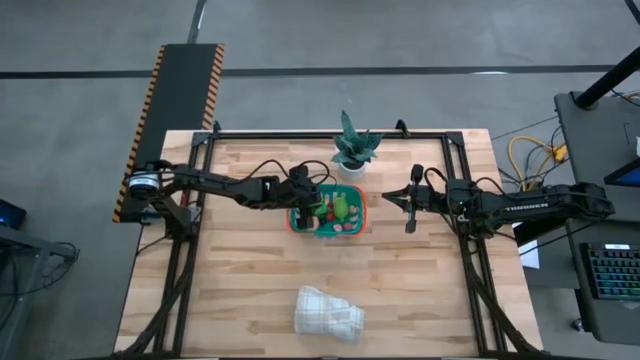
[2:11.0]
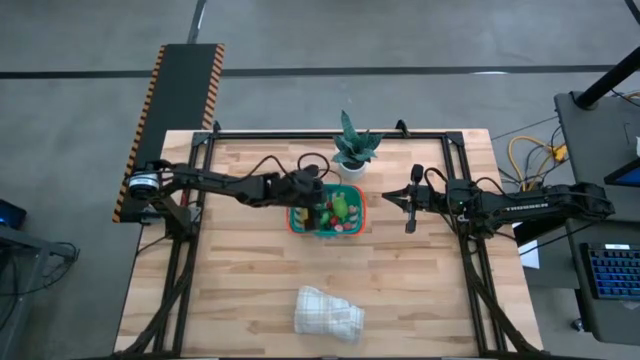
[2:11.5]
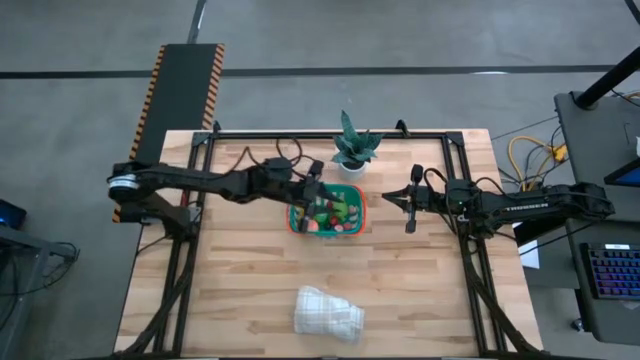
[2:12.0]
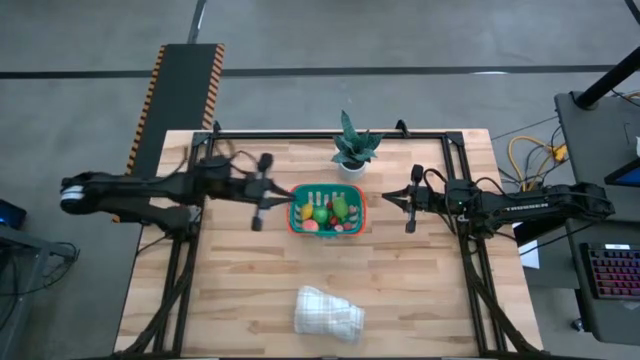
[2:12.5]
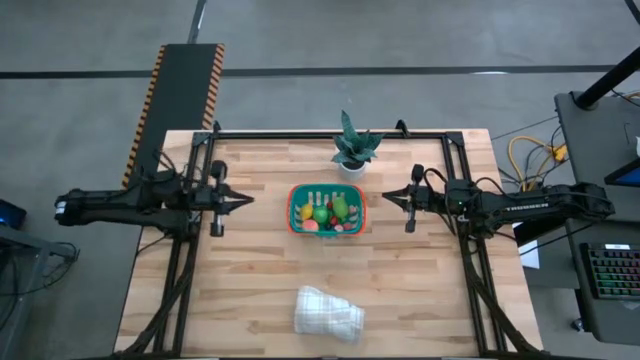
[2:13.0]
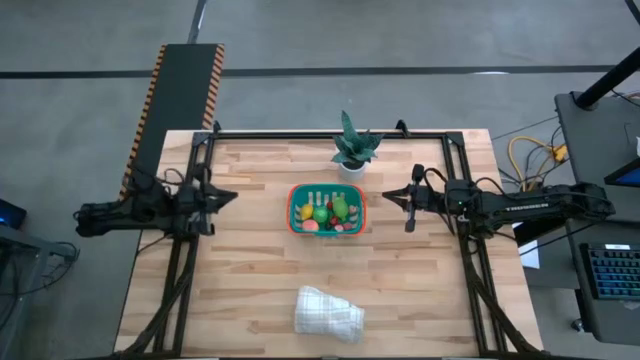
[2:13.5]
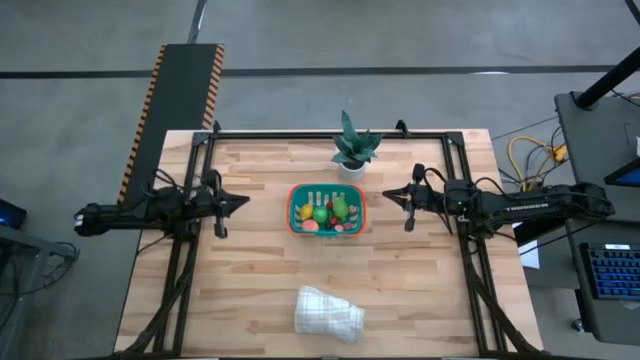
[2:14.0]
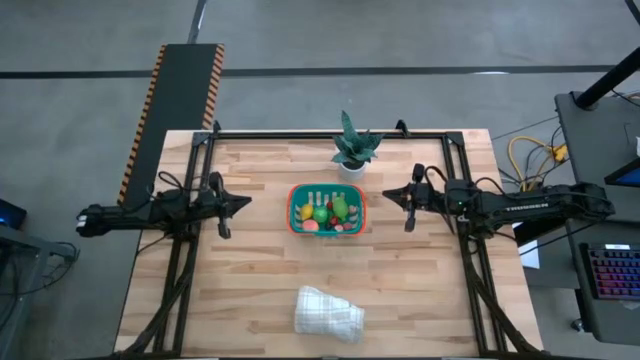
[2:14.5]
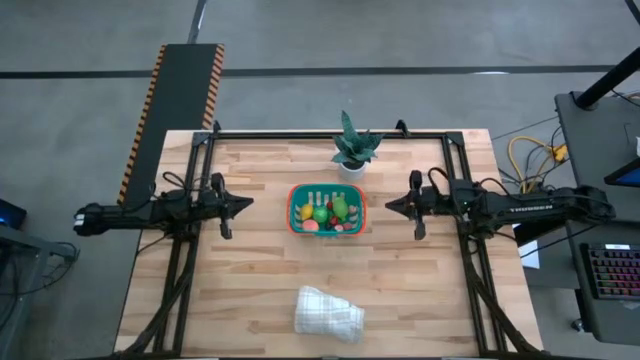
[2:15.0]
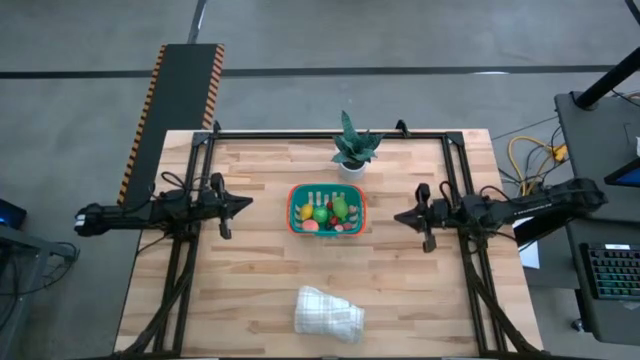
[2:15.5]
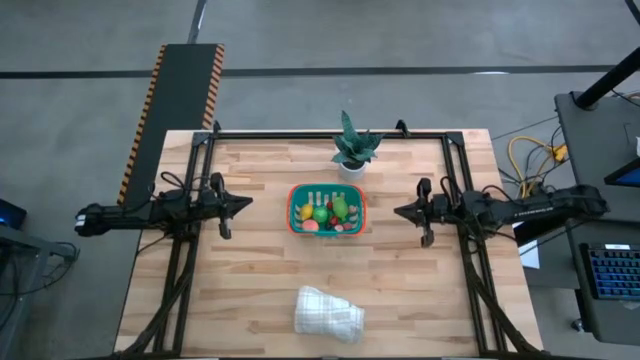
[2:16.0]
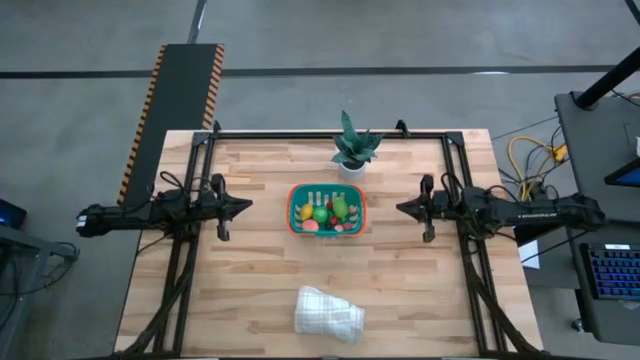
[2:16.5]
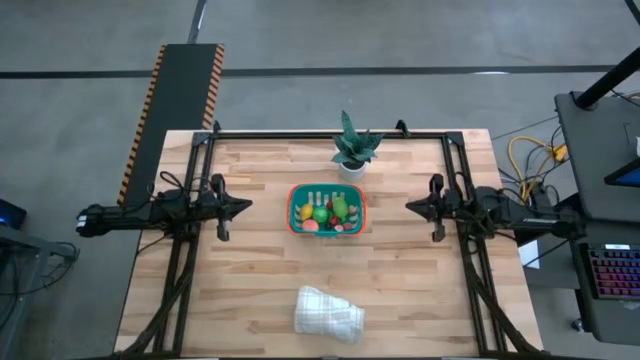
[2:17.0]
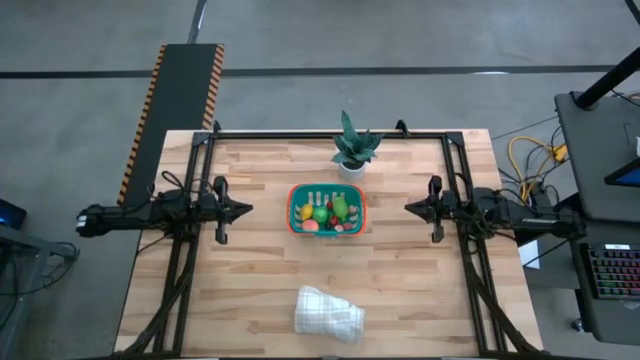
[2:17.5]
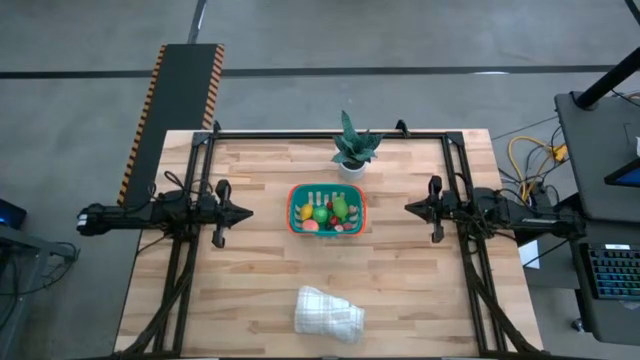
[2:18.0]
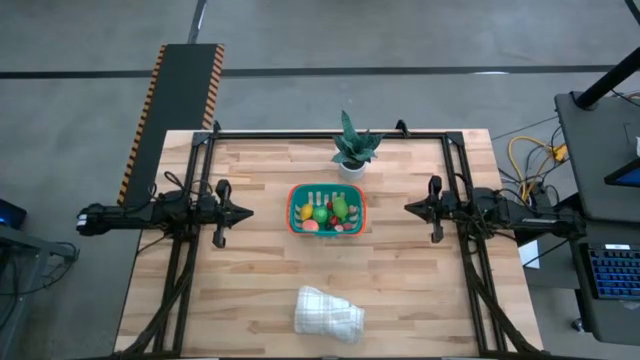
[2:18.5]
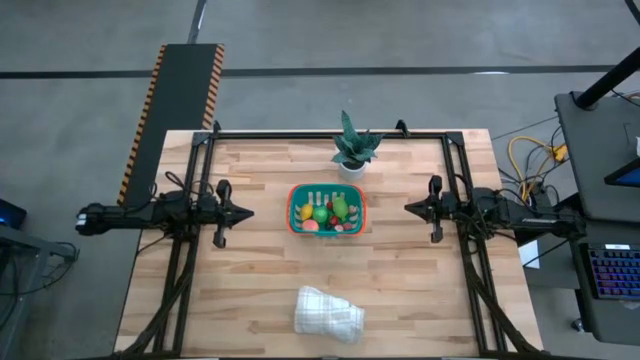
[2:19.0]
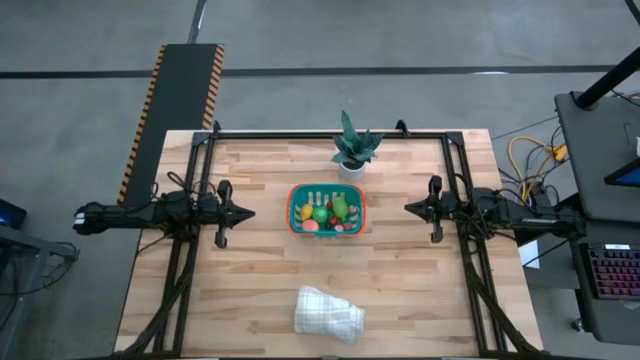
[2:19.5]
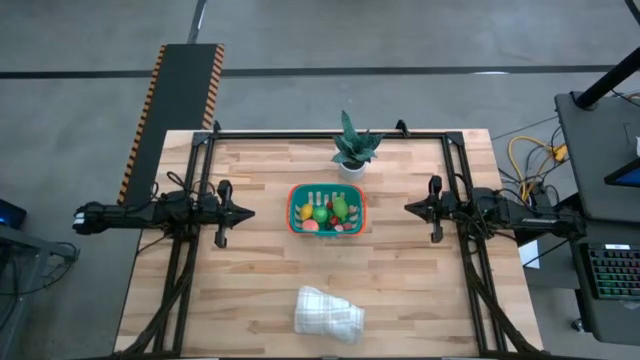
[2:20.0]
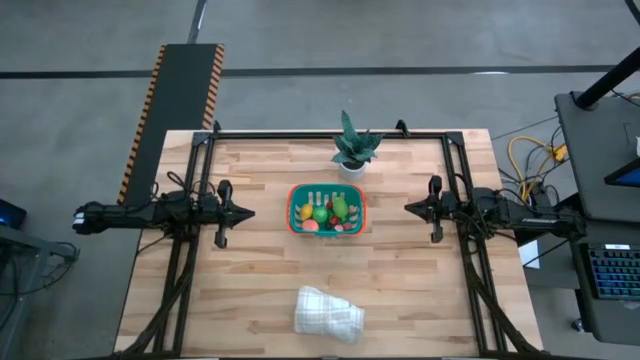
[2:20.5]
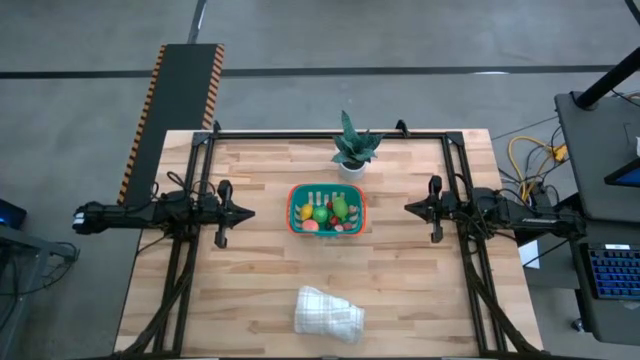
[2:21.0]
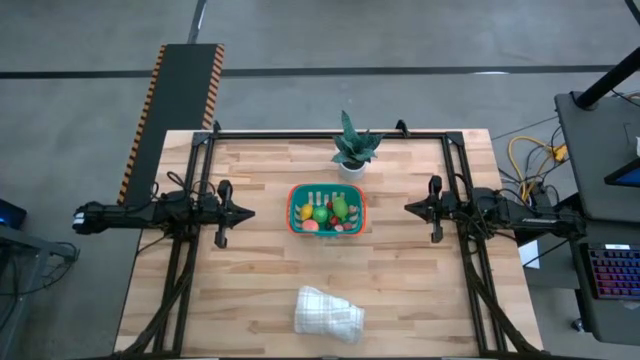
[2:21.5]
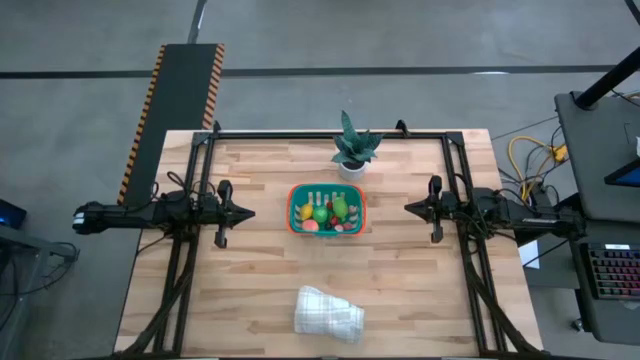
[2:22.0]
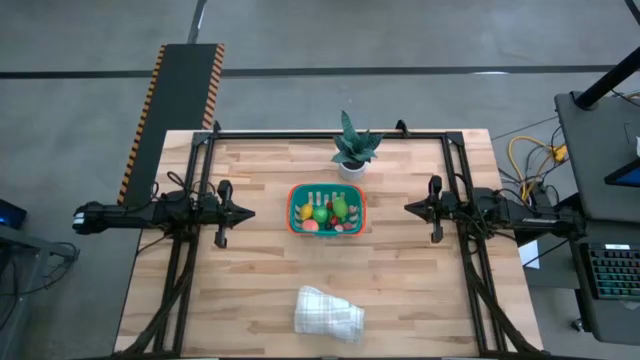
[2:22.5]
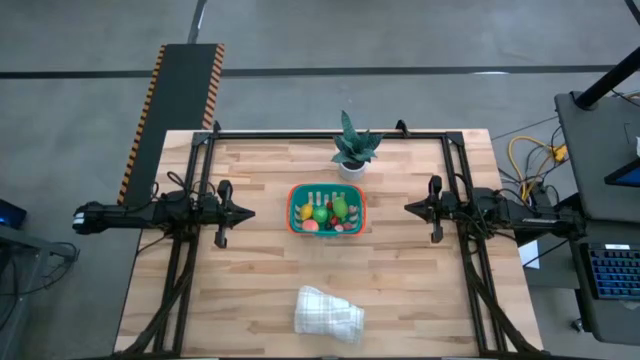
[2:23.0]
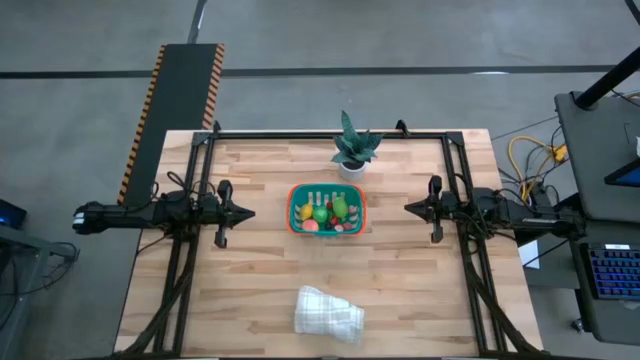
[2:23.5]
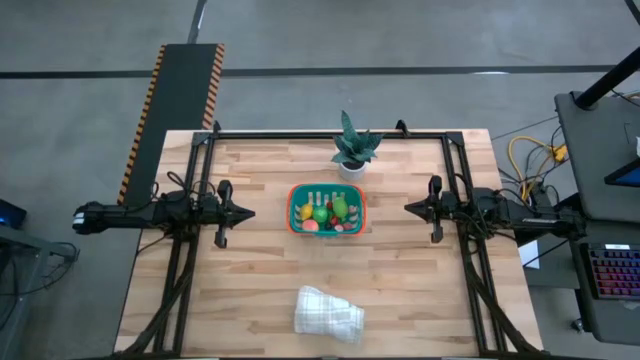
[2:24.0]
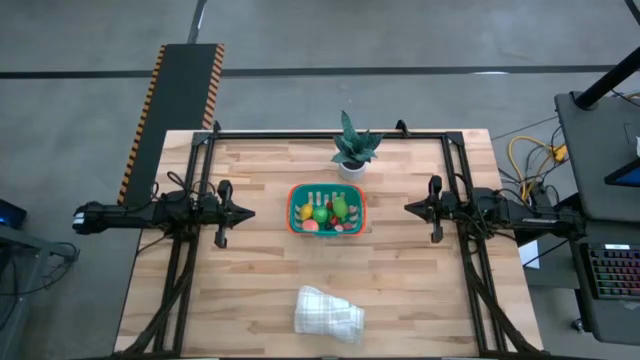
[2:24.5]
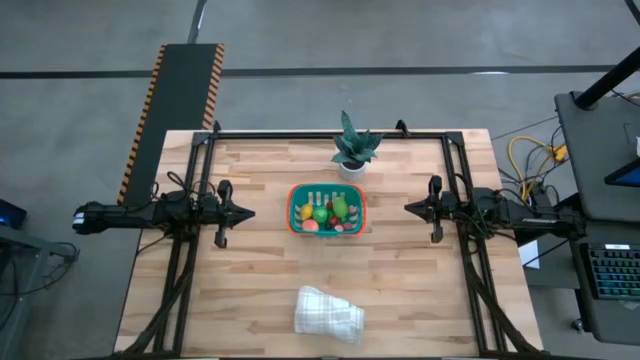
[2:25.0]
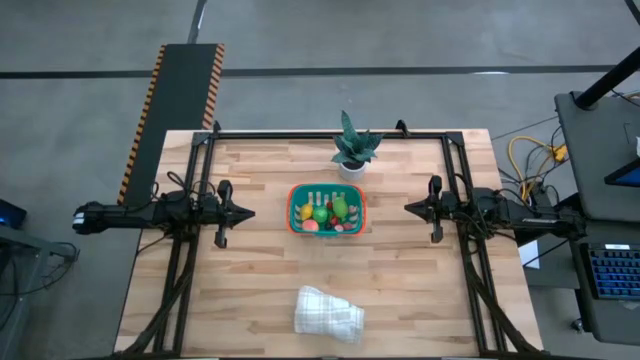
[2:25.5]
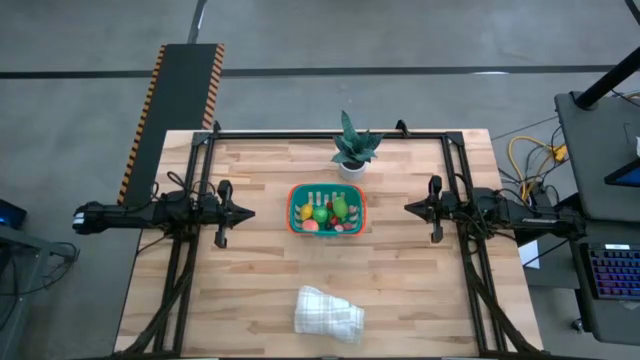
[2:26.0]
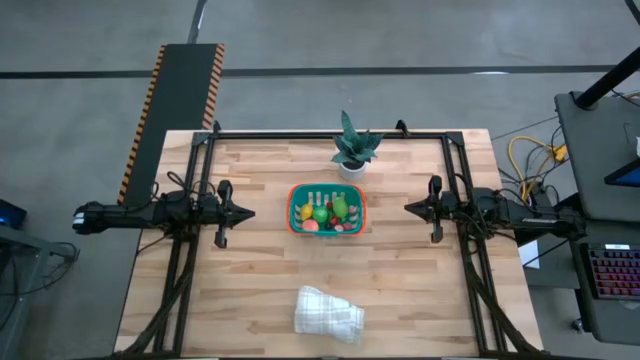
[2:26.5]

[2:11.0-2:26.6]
Task: Build produce basket
Return to Home Position
